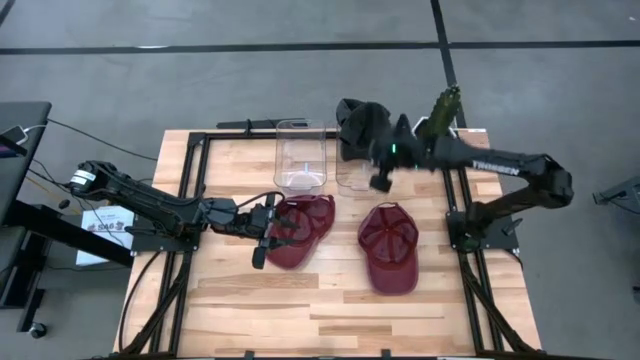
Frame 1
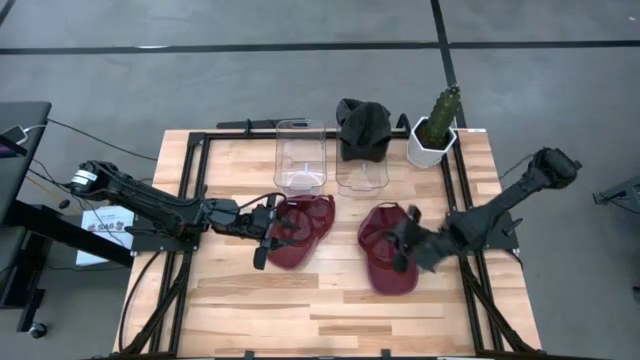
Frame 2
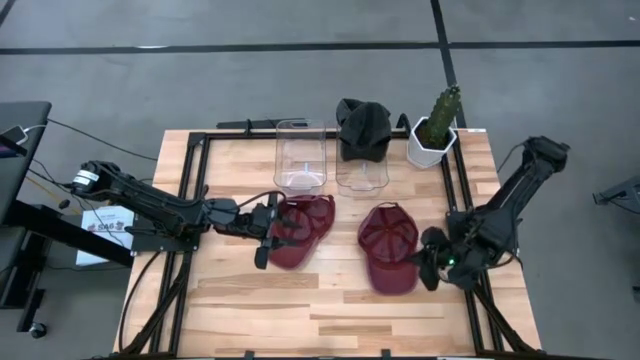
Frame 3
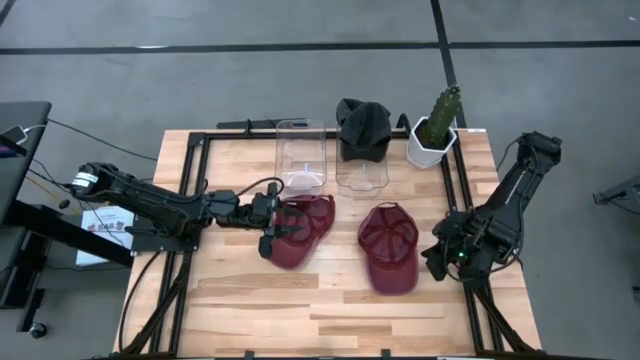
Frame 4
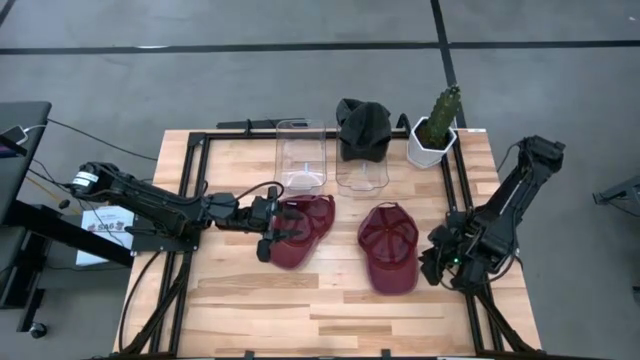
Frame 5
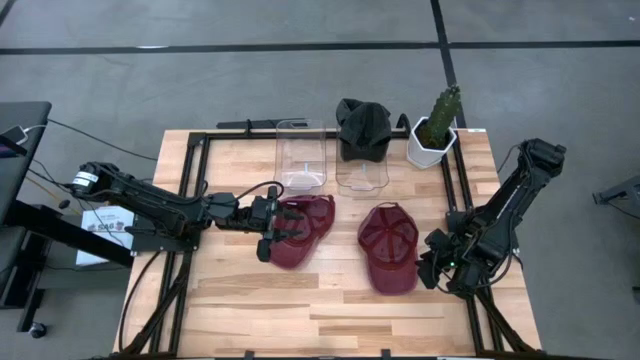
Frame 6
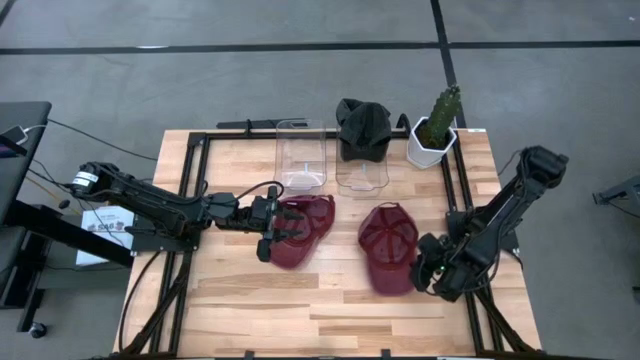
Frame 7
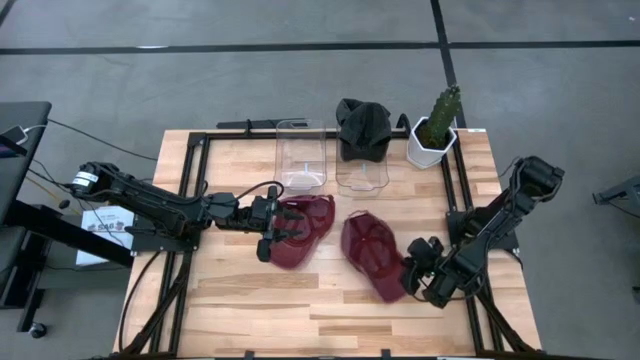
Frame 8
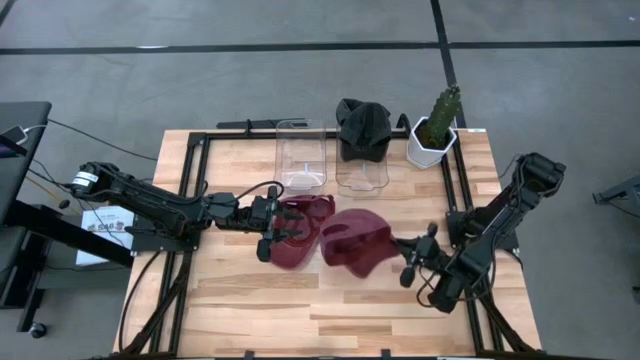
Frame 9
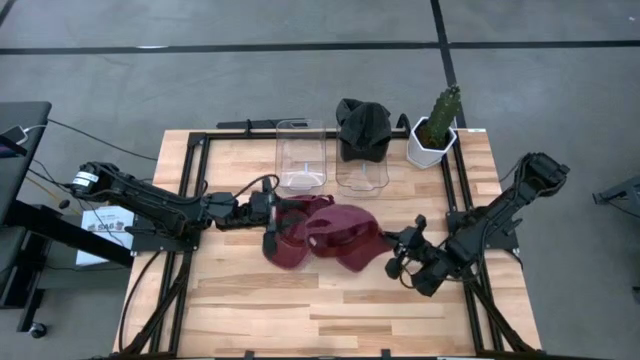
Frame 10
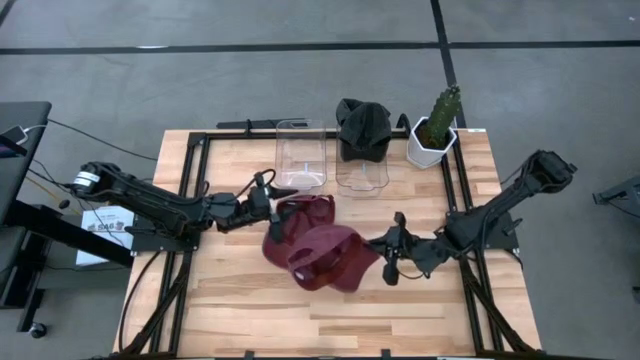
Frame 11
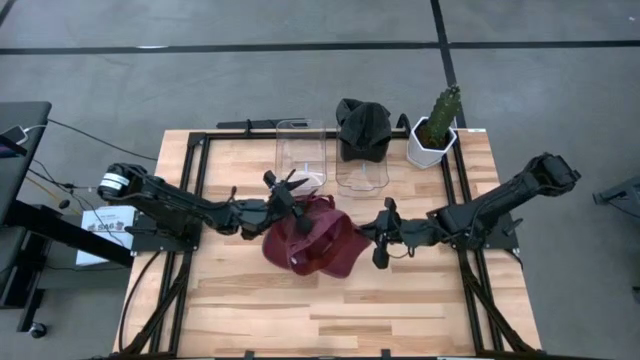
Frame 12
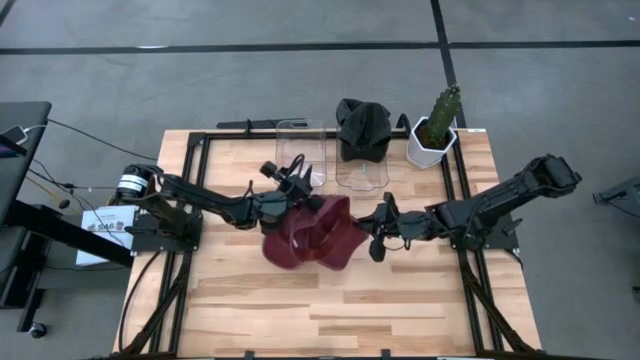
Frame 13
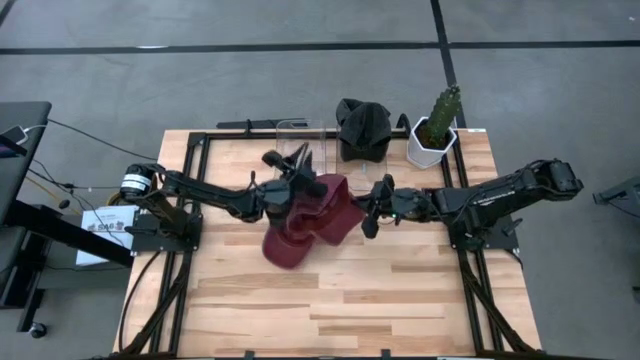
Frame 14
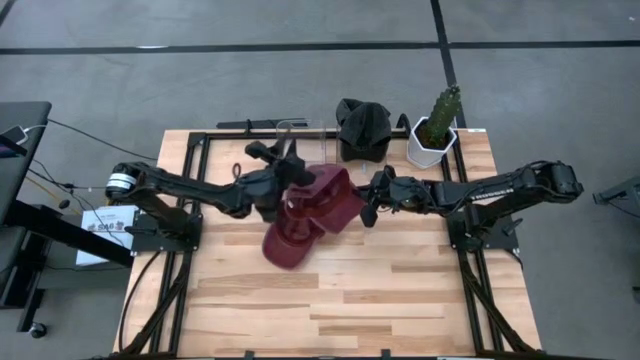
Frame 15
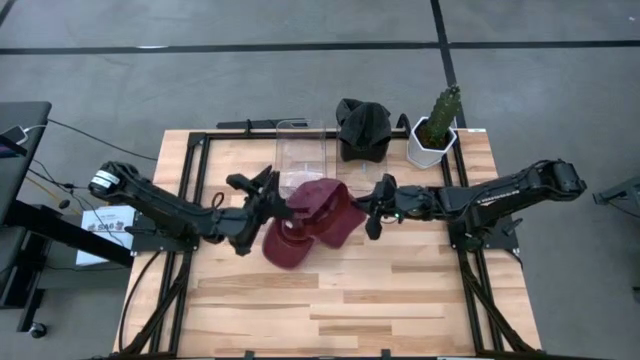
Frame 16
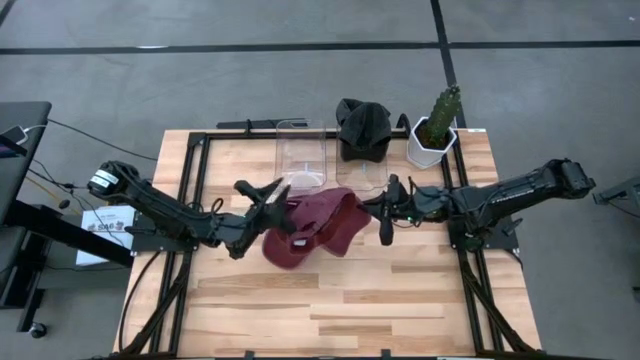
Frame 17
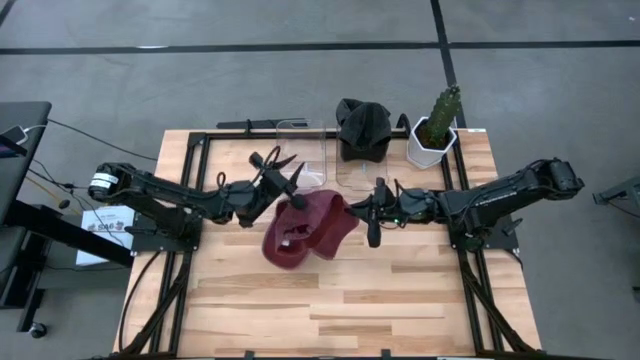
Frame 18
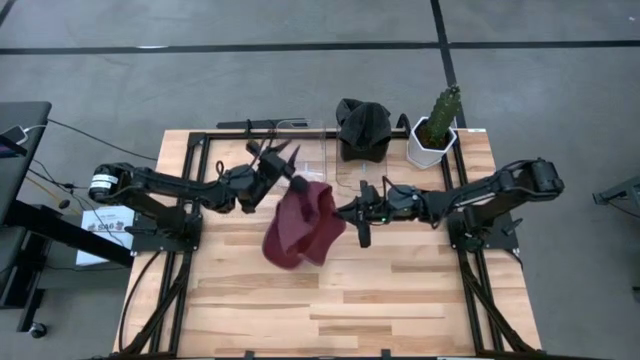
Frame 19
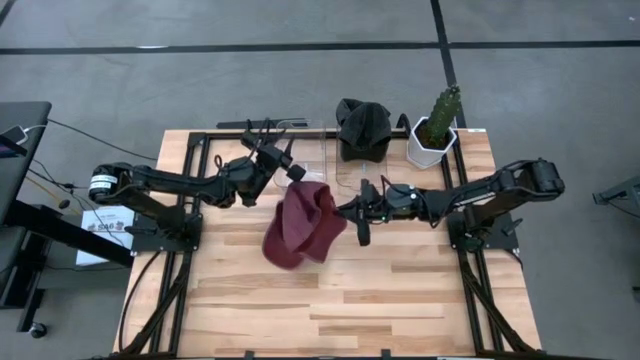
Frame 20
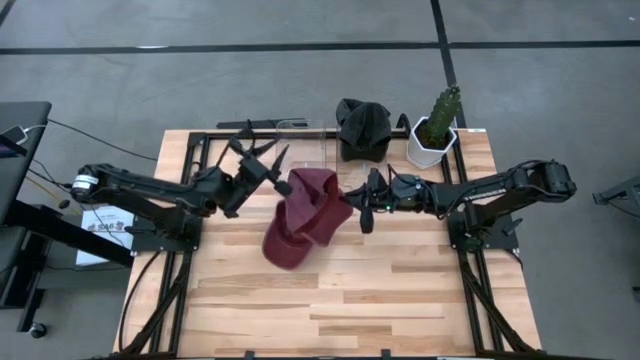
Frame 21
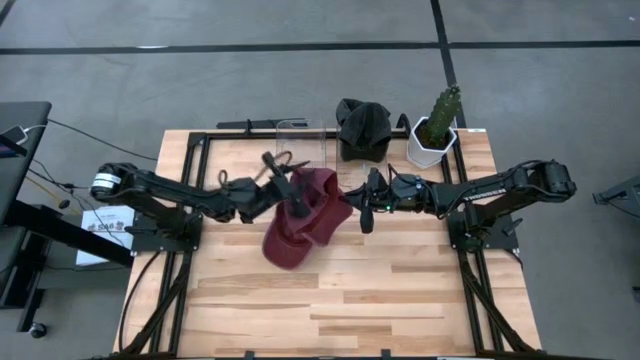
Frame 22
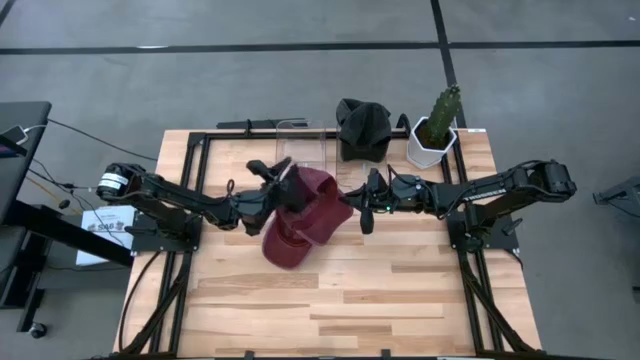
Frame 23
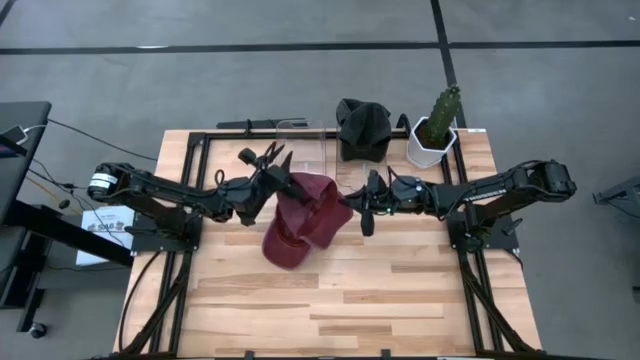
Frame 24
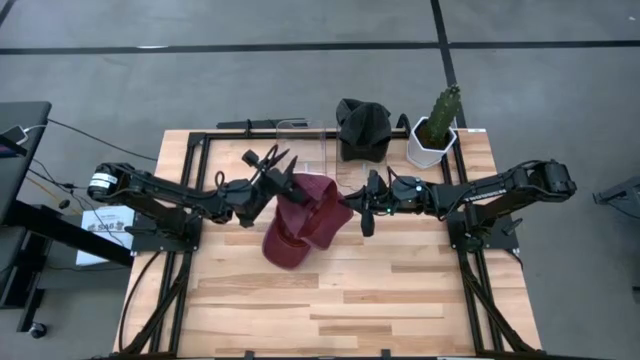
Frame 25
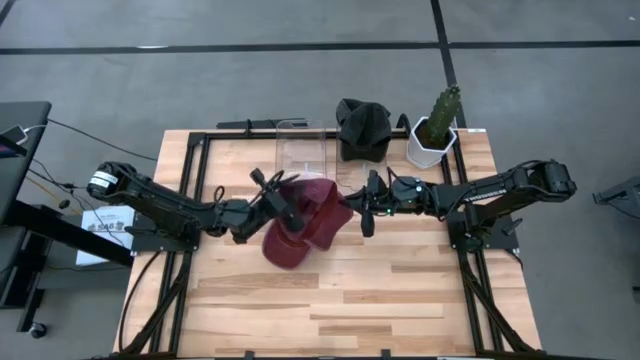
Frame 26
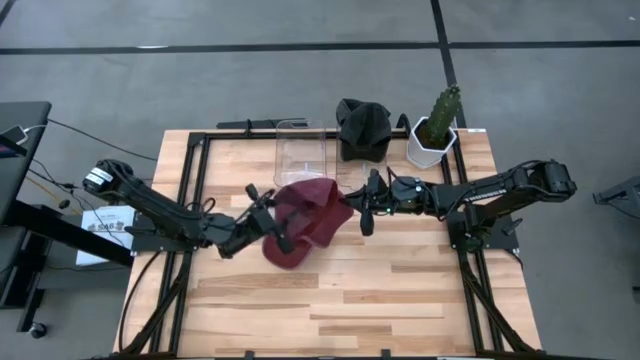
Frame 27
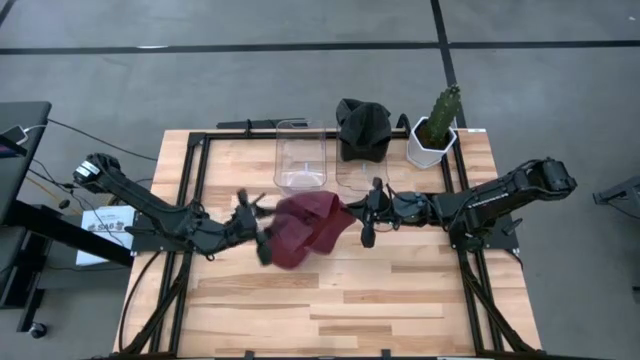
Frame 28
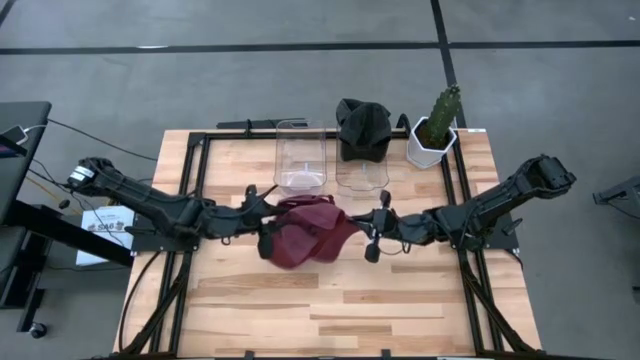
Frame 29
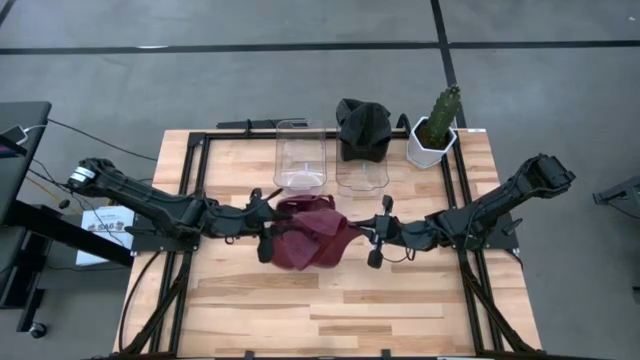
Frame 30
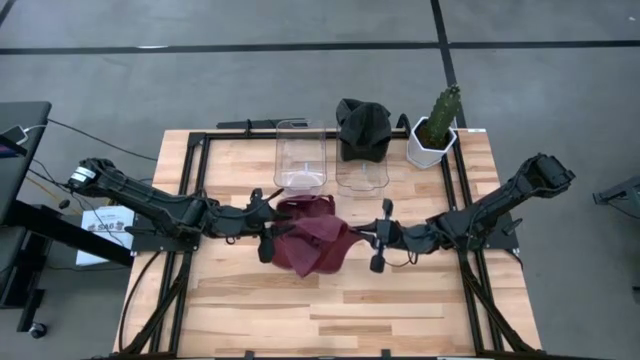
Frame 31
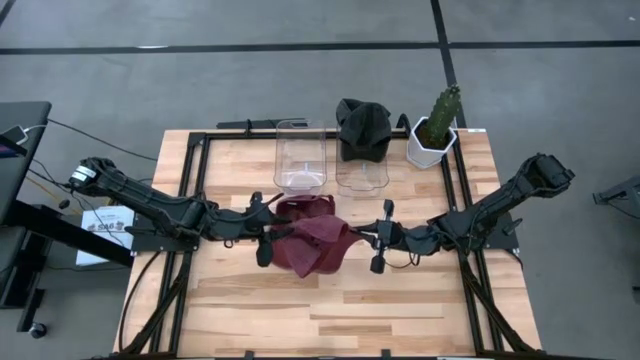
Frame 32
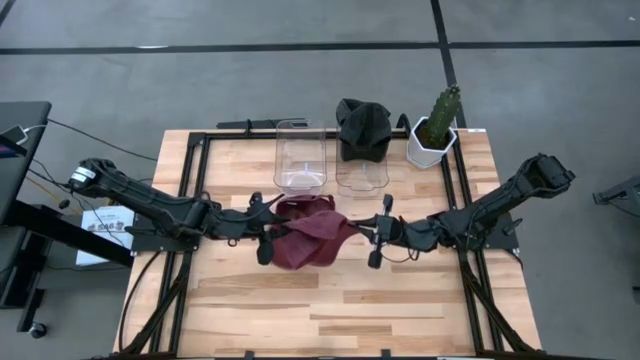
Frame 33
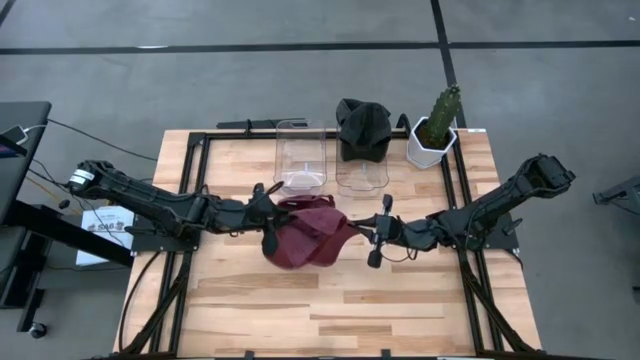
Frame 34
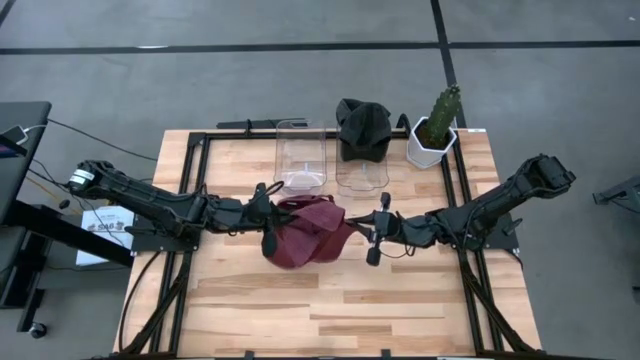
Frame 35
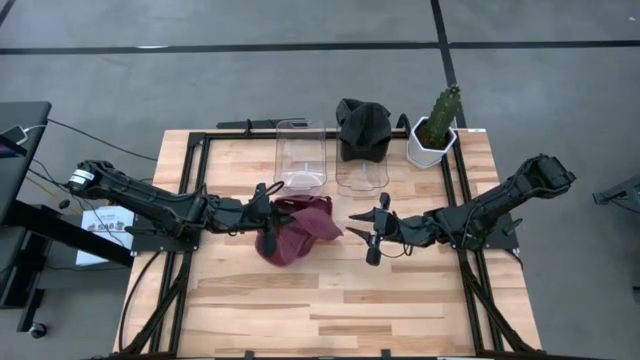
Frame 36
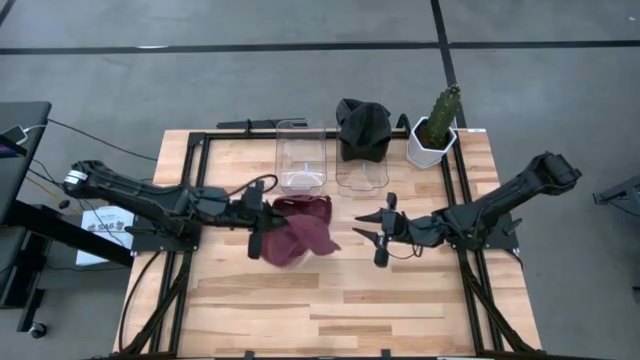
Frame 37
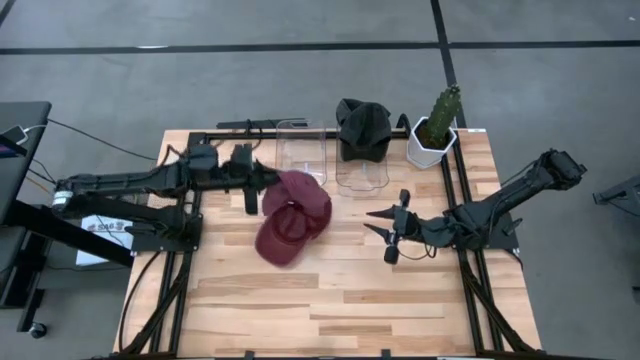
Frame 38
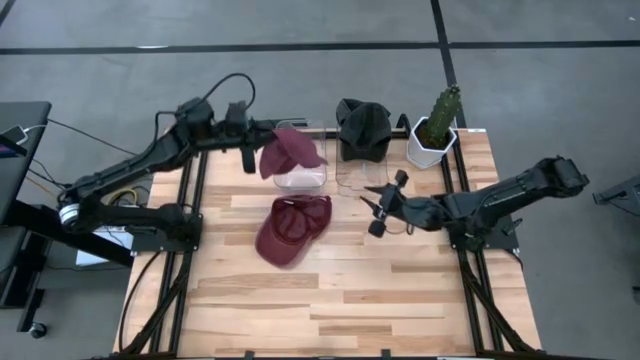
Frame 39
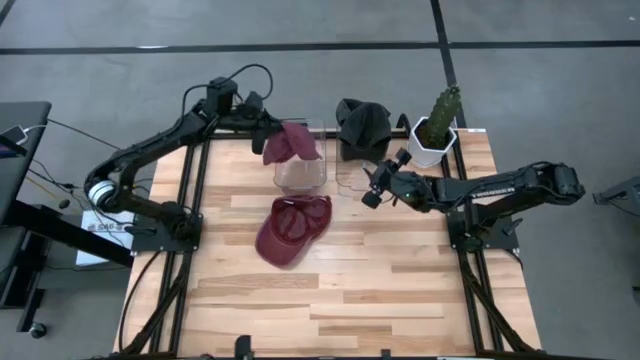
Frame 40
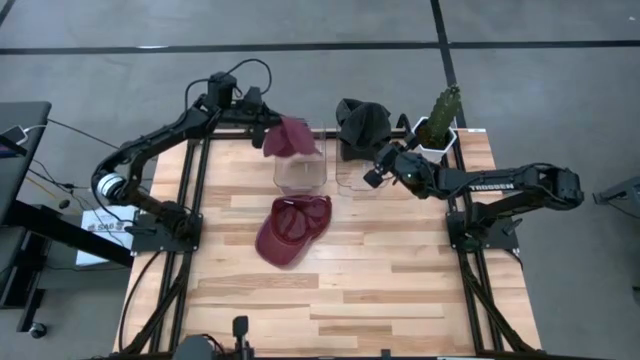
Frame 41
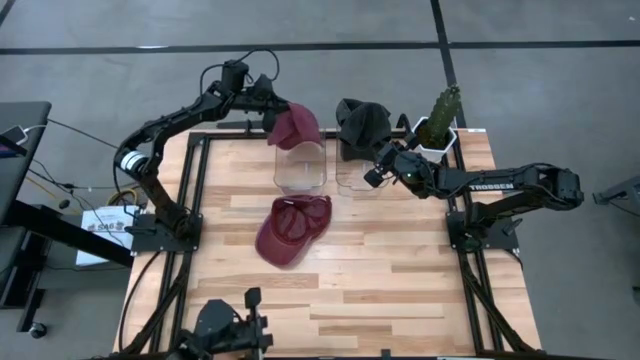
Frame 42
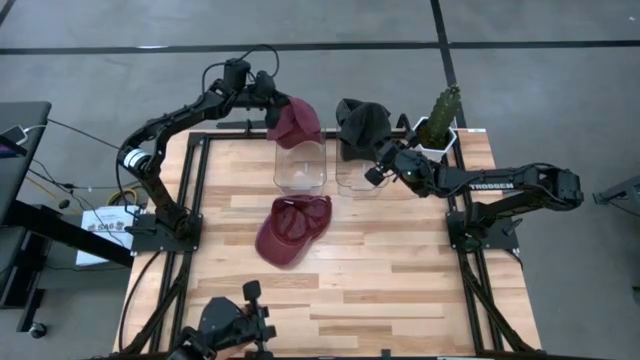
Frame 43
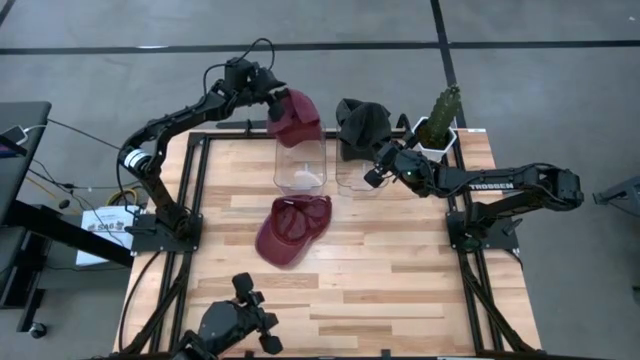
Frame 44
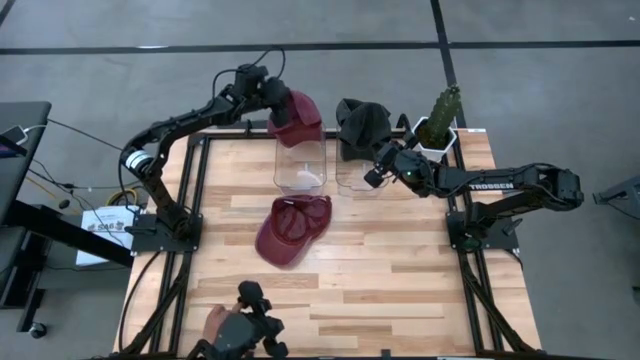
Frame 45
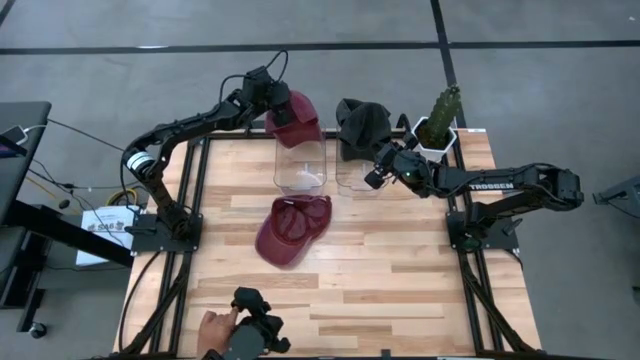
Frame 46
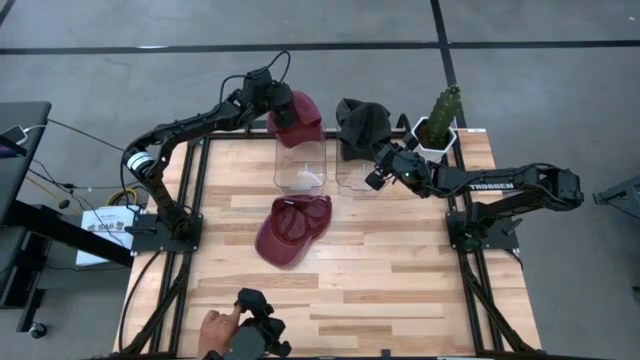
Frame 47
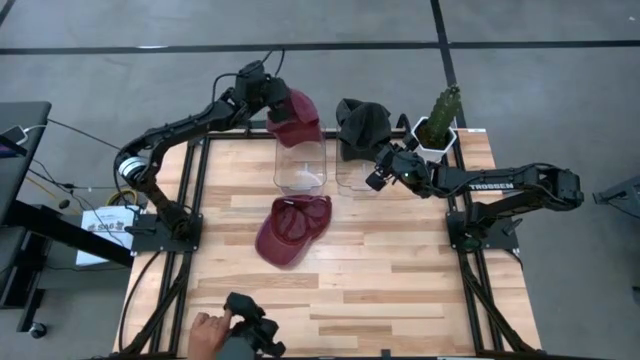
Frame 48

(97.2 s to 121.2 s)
Task: Pick & Place hat
Put the red cap into the left transparent bin
